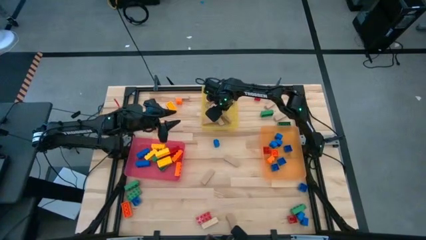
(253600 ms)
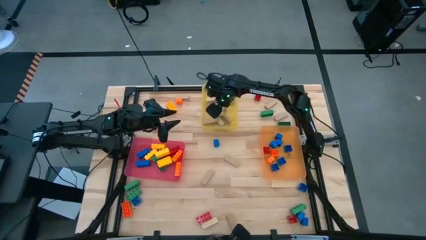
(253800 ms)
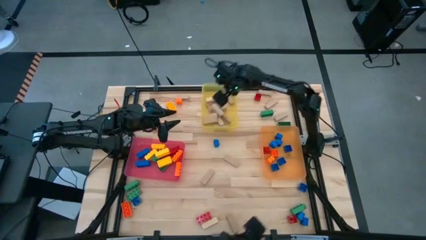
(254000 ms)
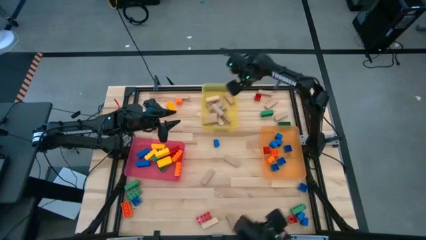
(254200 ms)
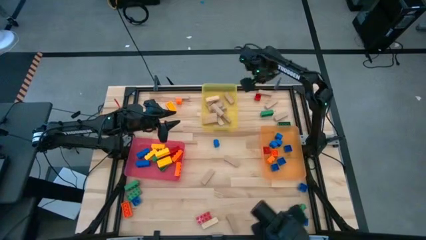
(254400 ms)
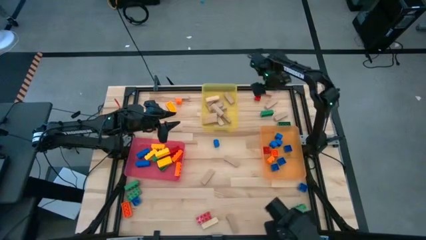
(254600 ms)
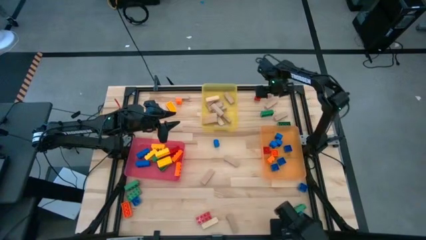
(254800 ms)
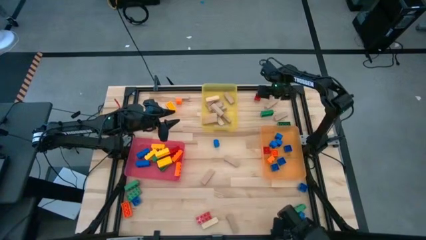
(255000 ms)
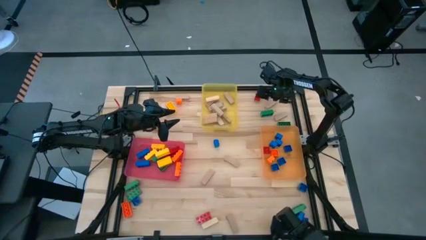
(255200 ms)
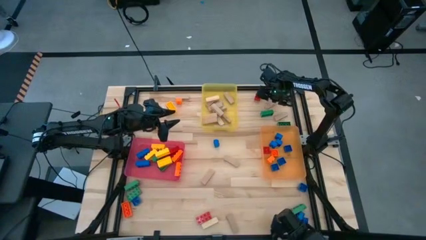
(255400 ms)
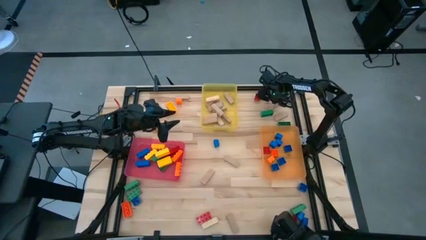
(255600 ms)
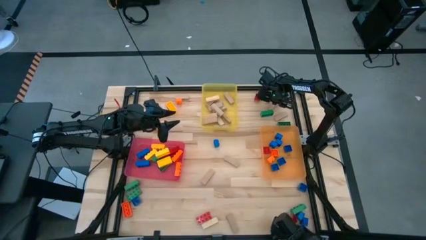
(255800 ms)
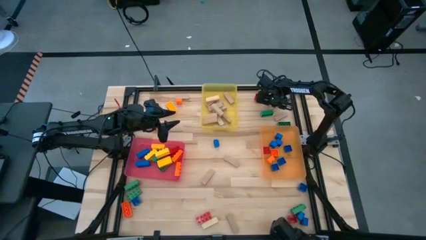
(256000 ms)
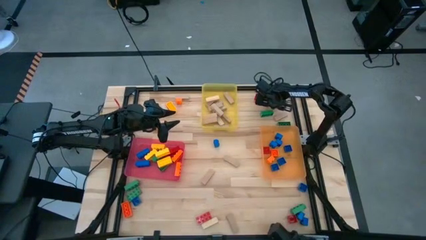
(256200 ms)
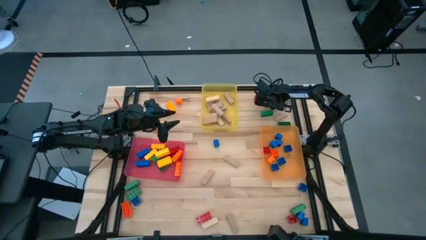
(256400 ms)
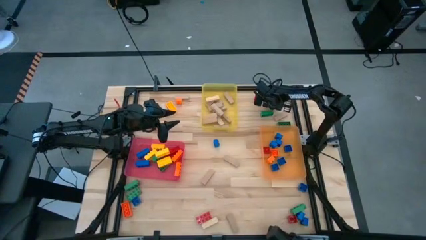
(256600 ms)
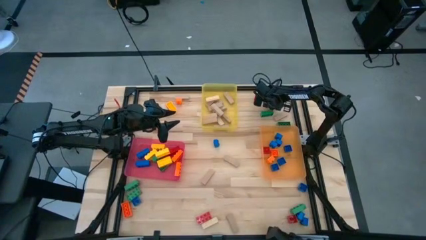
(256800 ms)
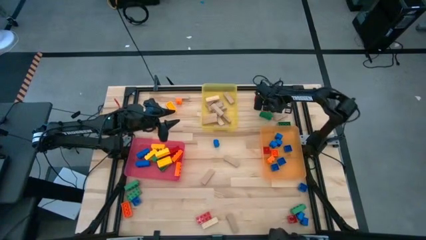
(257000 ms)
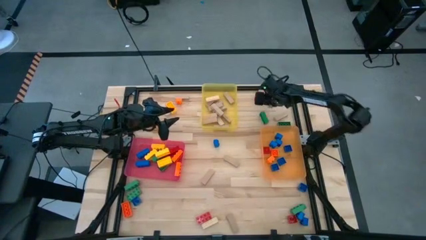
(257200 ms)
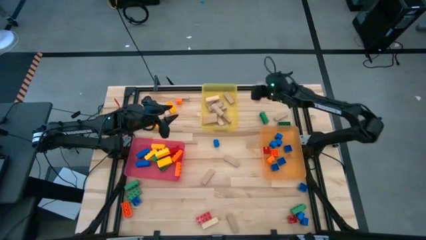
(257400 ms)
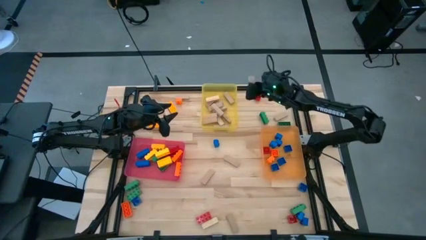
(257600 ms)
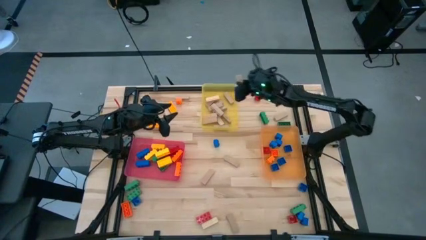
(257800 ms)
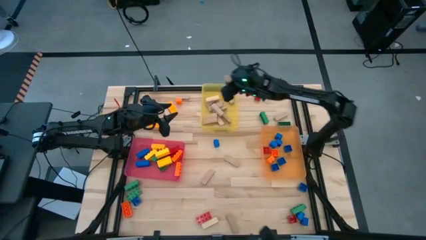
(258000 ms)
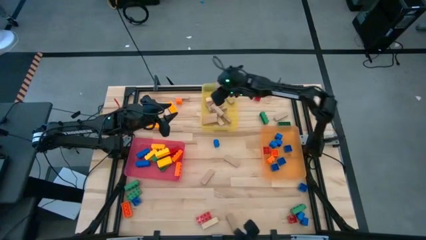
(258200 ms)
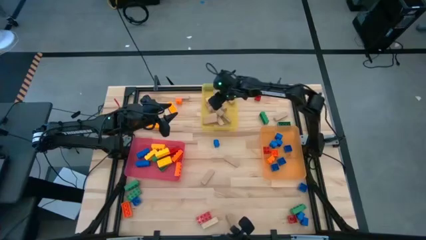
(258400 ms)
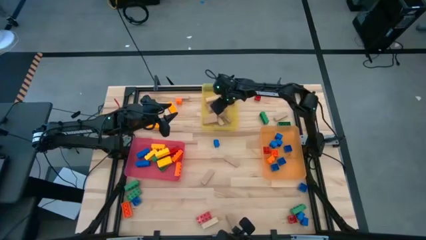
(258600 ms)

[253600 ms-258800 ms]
Task: Sort blocks by size
Put the wooden block into the yellow bin

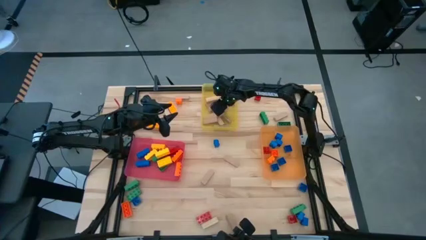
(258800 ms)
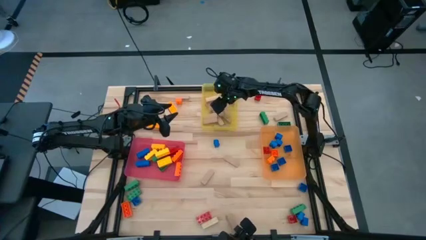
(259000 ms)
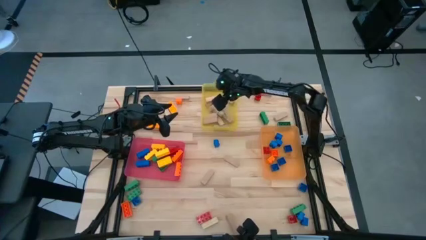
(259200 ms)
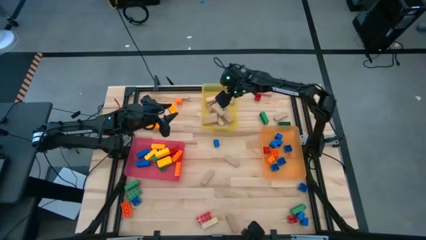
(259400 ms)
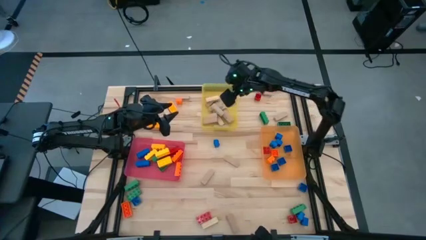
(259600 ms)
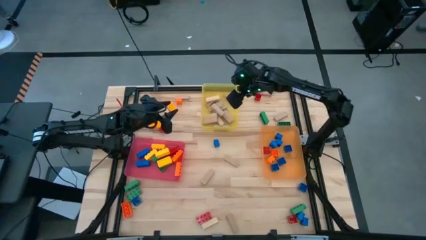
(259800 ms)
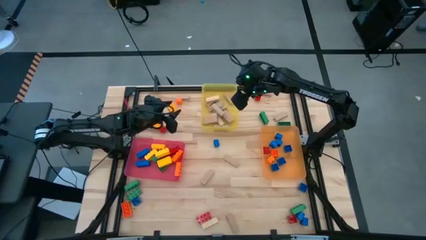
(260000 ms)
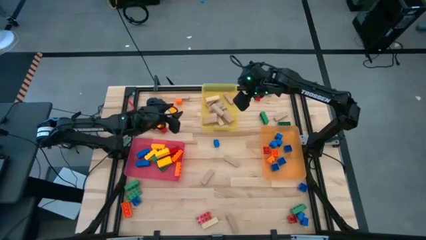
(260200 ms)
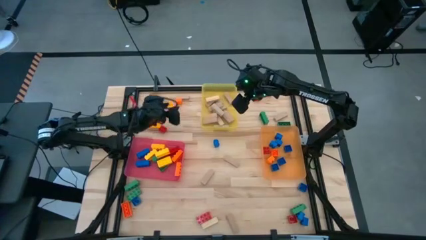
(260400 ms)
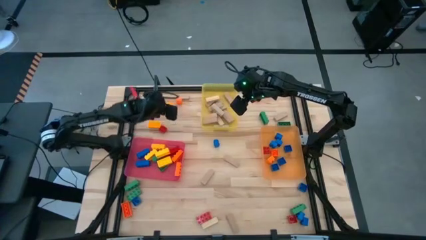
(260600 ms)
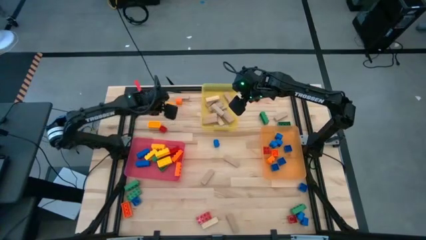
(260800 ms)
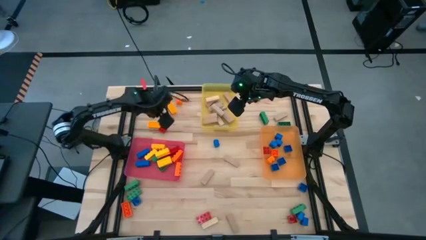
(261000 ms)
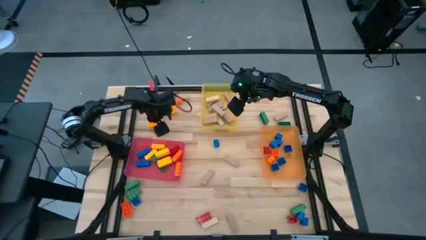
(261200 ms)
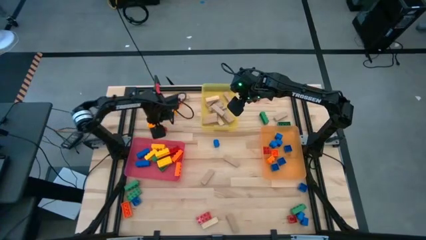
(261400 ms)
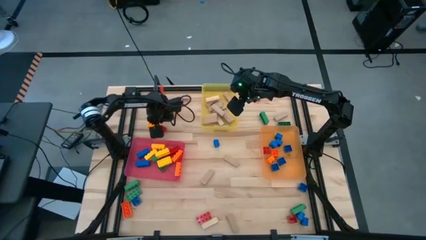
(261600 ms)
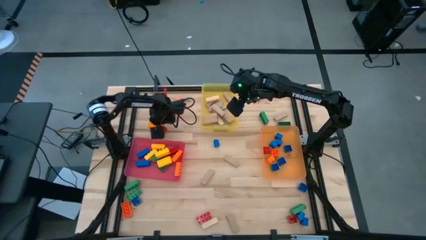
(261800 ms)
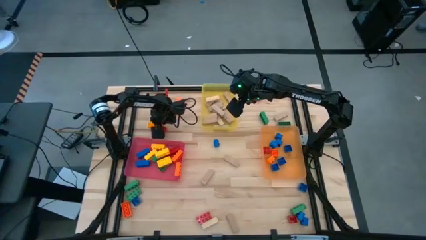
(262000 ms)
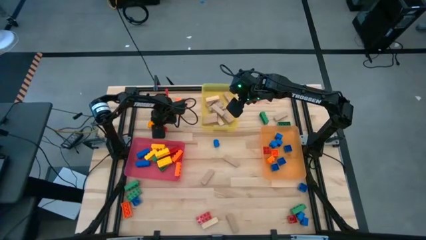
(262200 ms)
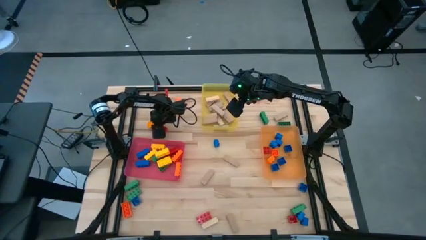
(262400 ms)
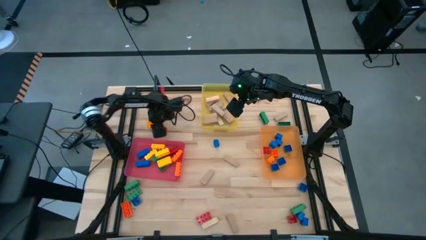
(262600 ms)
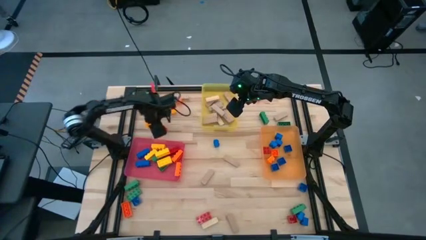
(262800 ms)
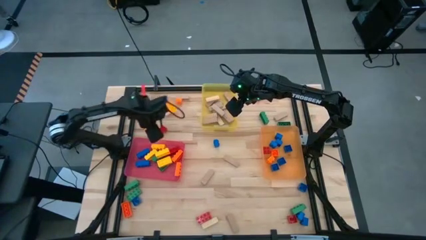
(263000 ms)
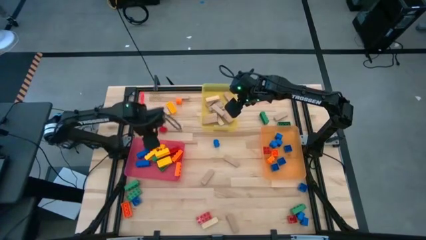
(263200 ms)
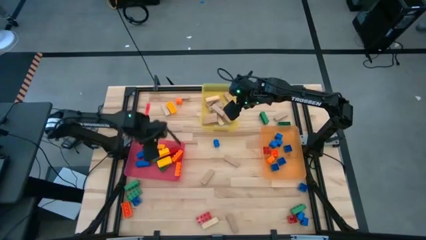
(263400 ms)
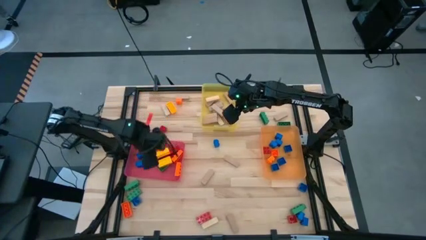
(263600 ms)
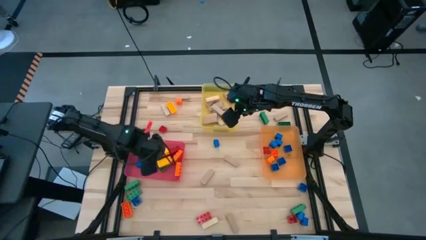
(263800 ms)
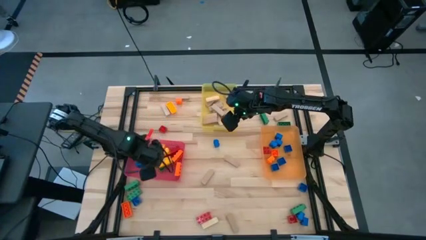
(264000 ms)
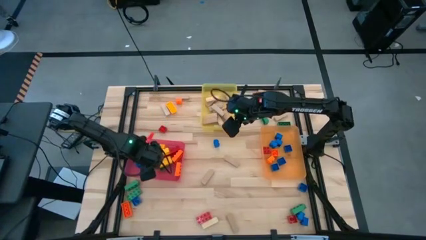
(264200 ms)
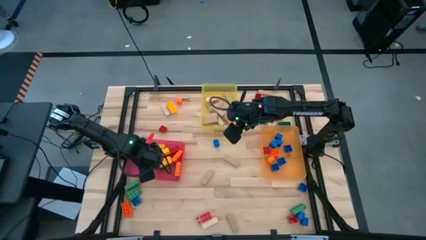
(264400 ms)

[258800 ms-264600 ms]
Put the 3 stud yellow game piece into the pink bin

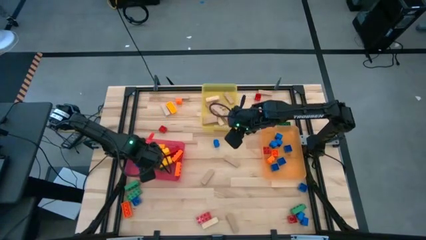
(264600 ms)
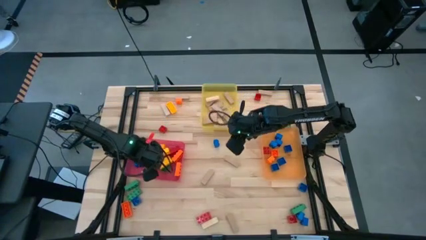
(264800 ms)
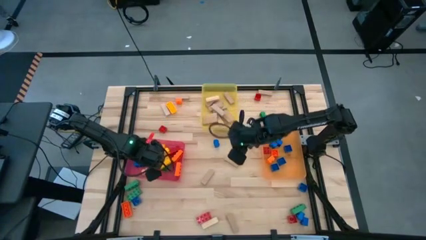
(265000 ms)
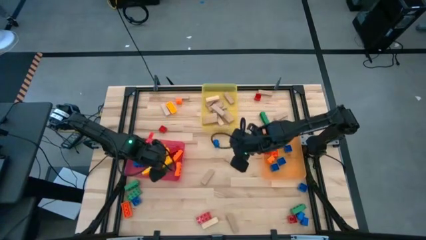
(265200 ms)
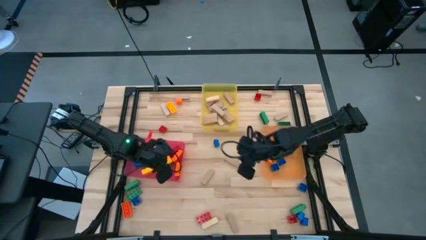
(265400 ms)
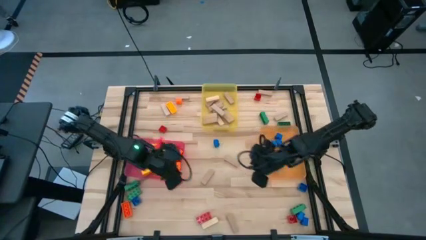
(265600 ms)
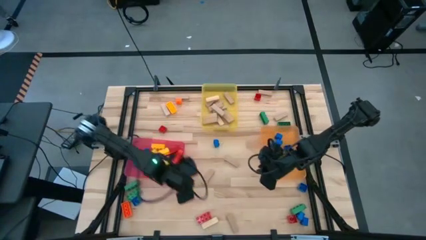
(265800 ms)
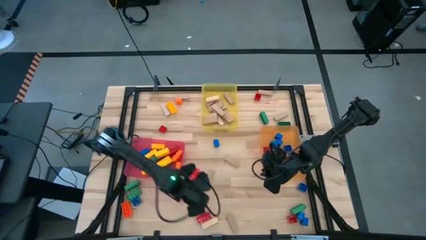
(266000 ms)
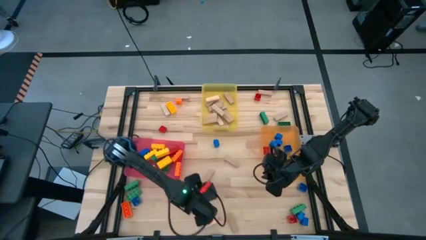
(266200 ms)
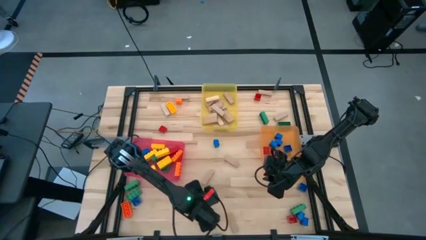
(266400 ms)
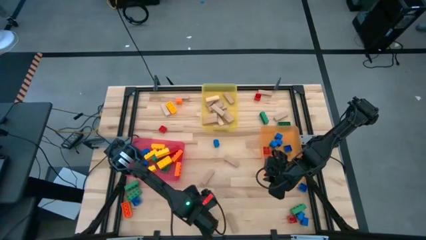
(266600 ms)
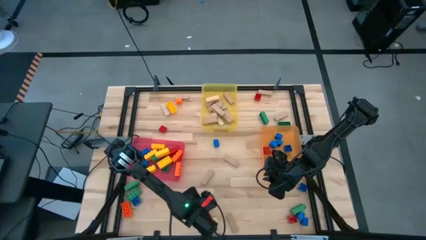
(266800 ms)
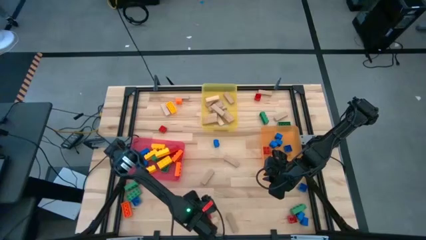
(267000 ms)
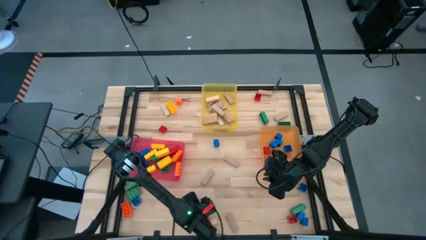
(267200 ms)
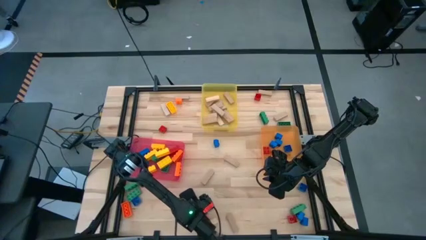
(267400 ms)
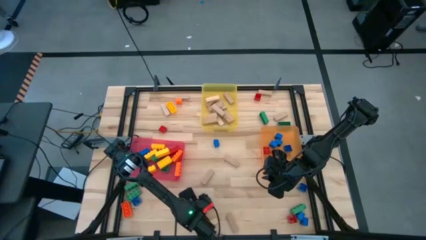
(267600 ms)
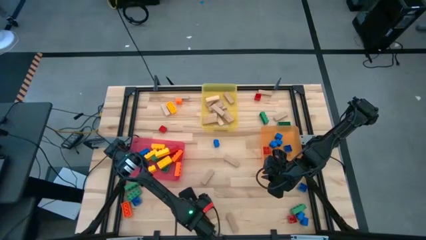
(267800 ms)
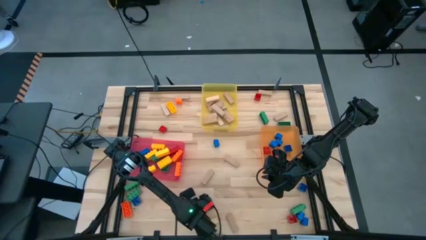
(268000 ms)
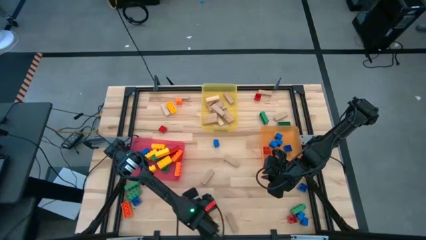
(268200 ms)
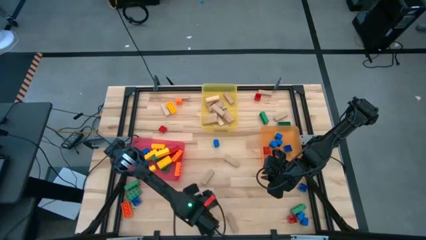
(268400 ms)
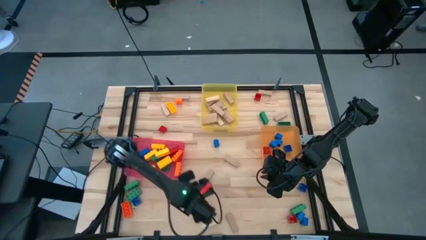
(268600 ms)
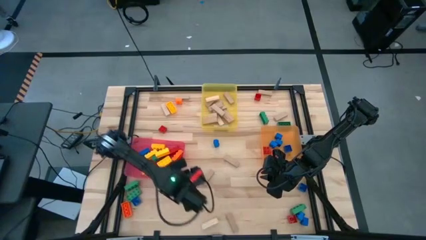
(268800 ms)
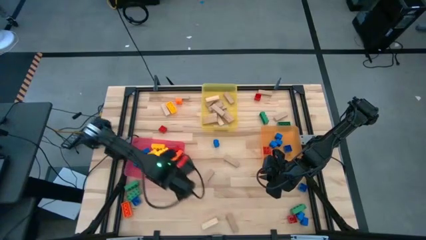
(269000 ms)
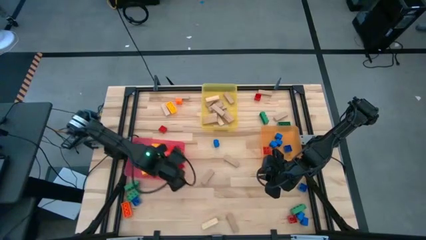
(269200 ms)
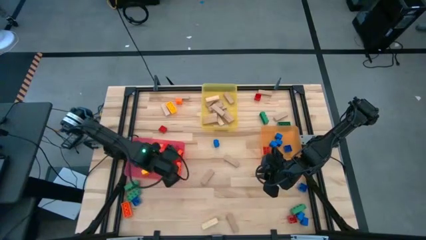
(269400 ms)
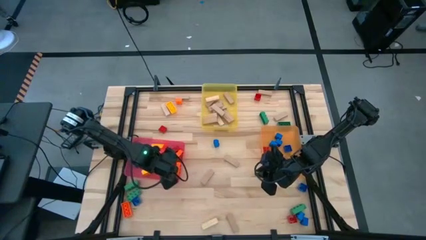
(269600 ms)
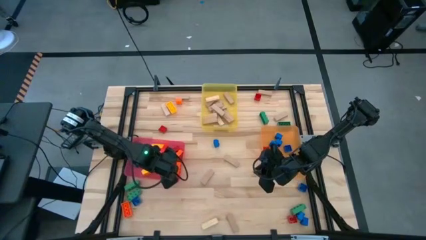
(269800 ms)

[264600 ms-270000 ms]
Put the 3 stud red game piece into the pink bin
